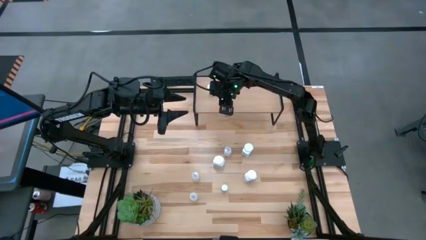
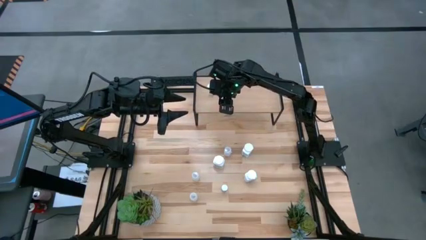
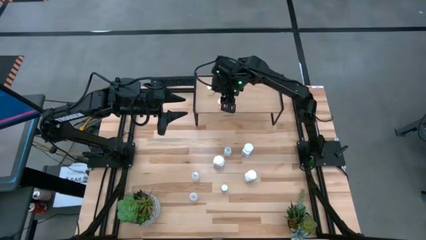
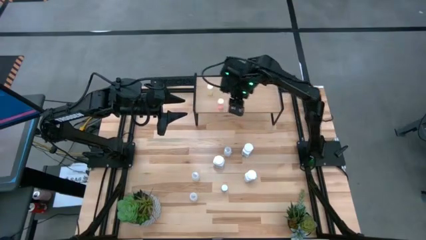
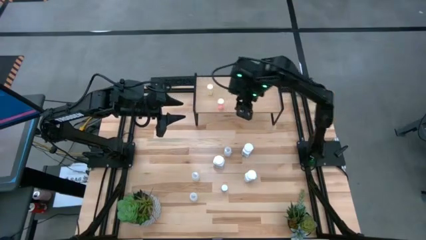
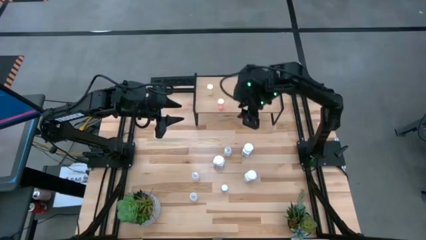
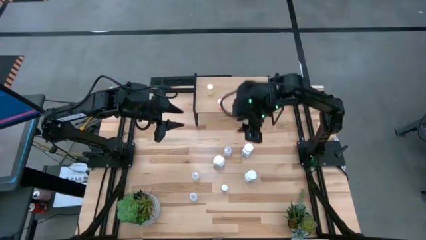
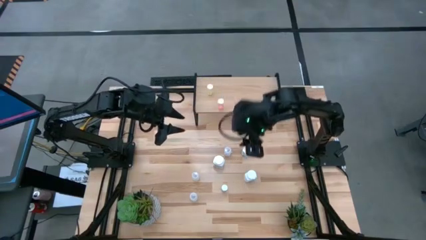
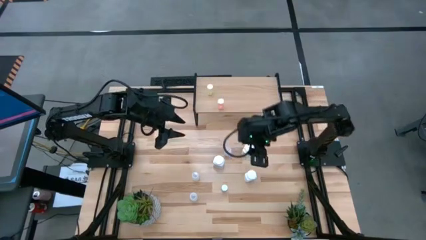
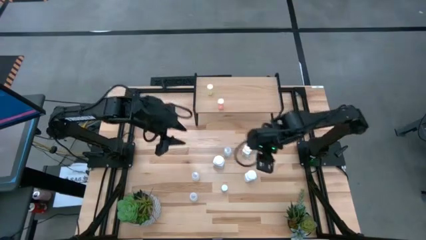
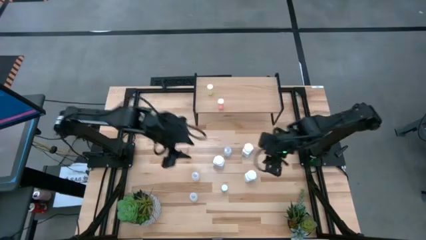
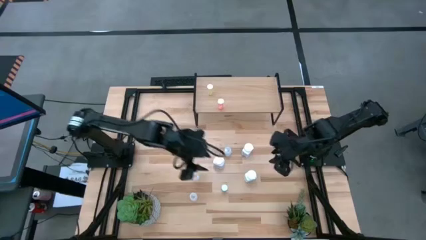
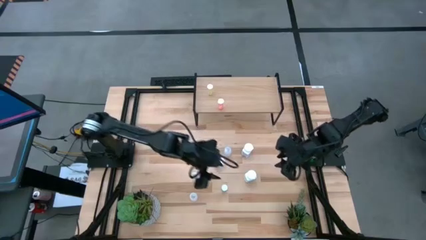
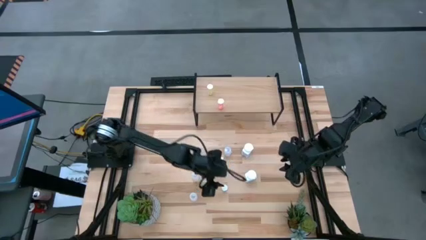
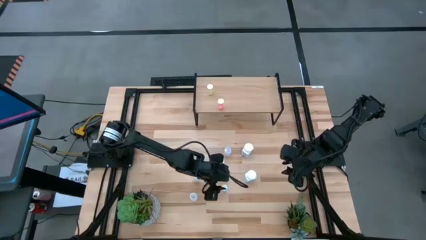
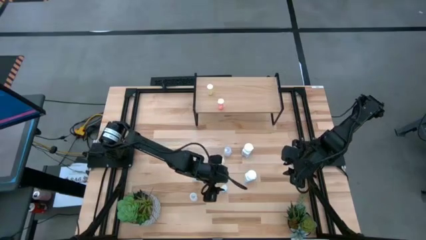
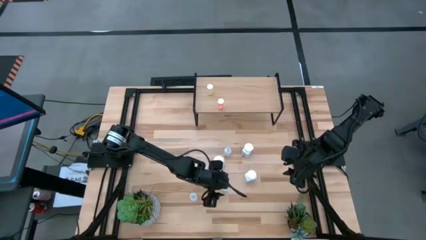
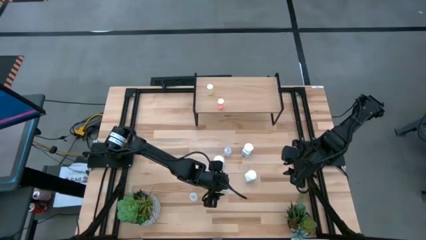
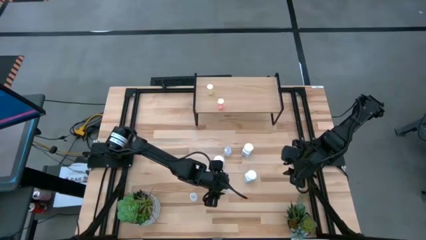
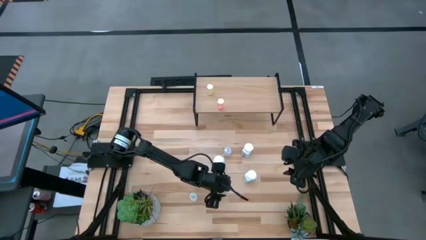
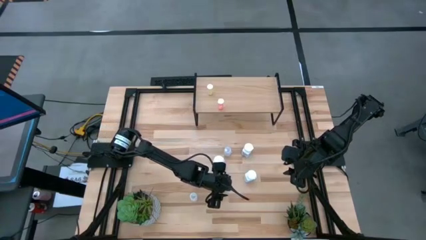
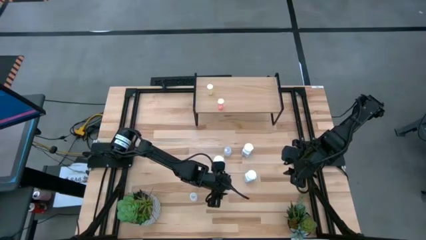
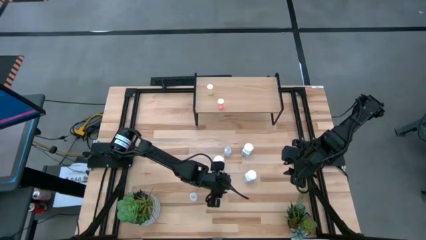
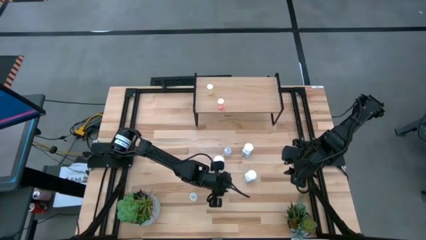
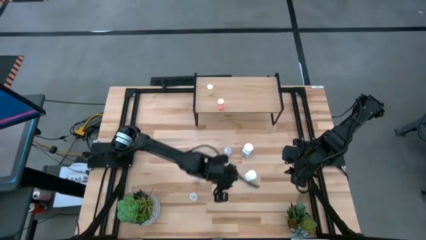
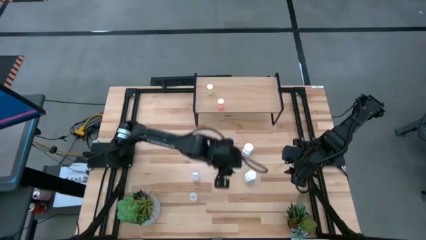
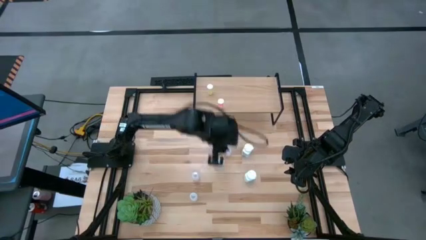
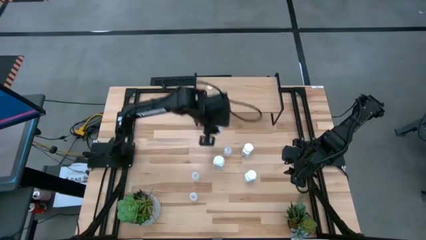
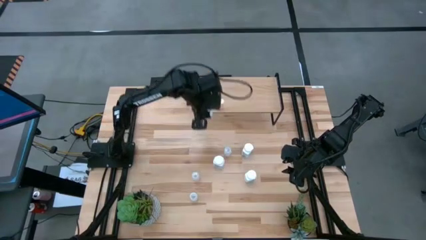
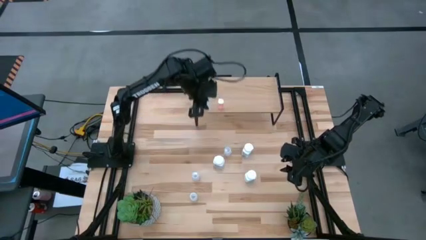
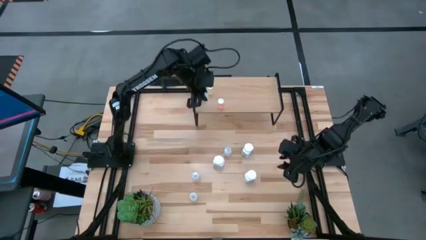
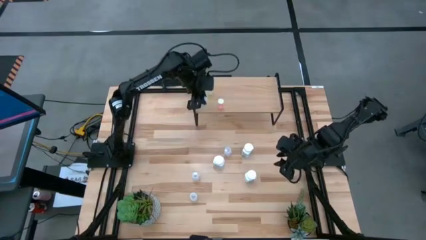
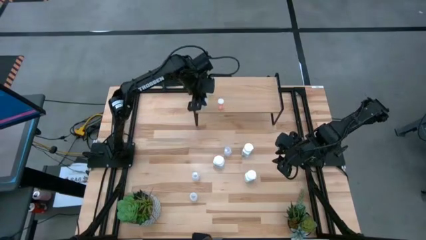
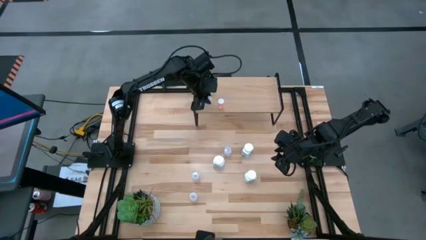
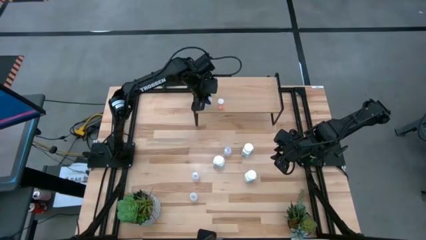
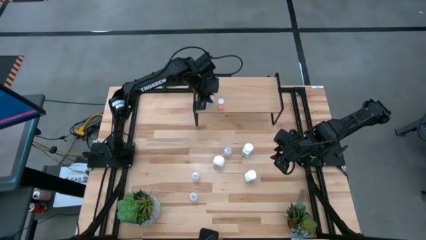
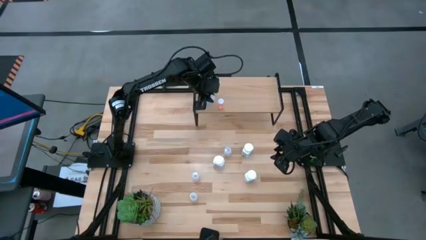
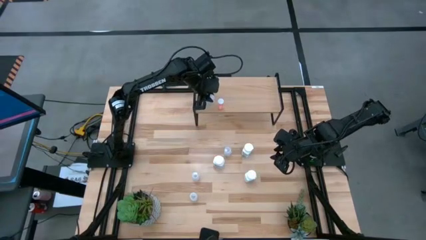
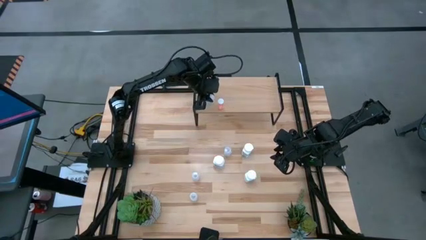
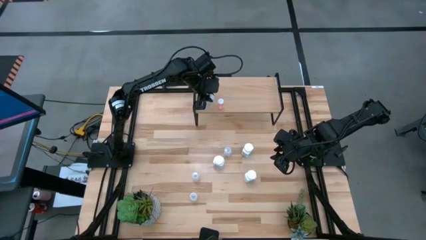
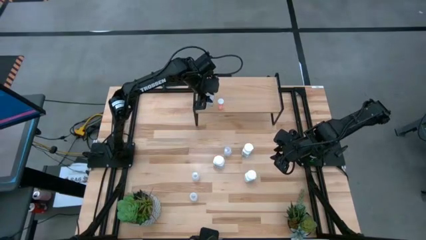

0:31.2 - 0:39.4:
Task: Pick and place medicine bottles onto shelf by color
Put the blue pill bottle on the shelf

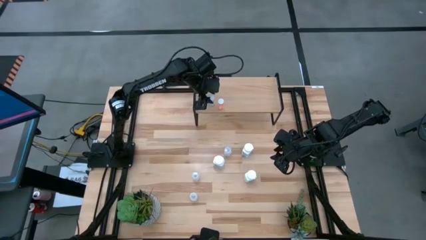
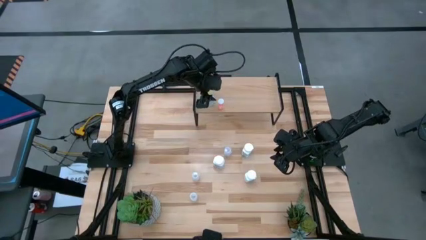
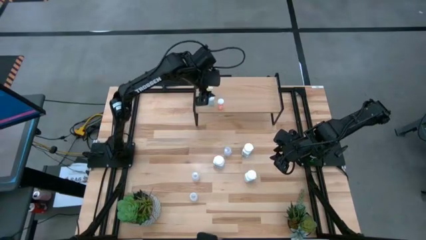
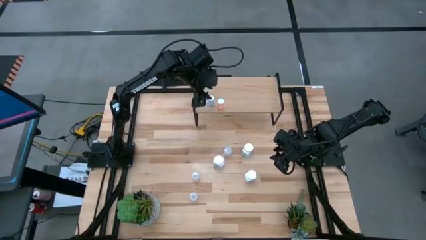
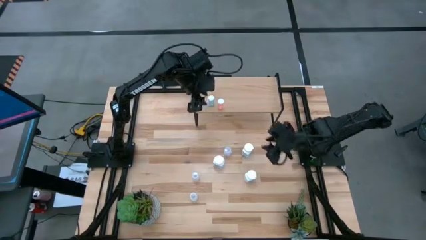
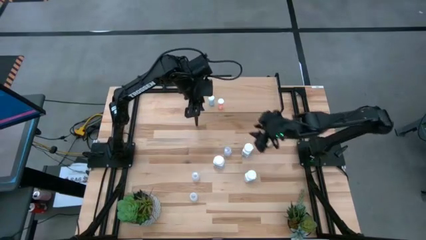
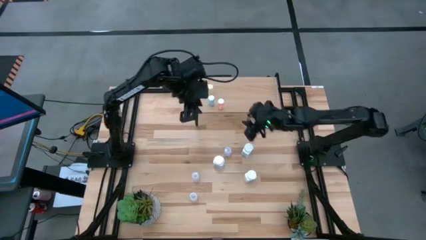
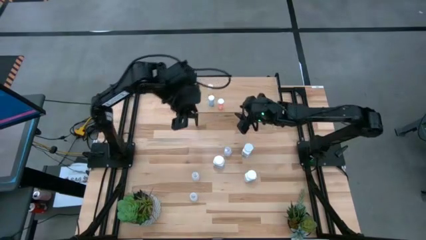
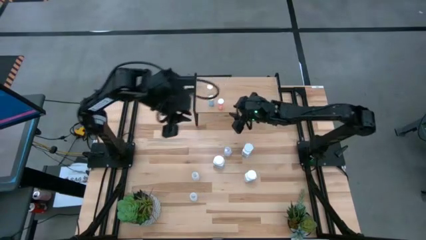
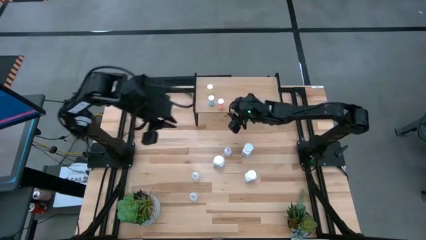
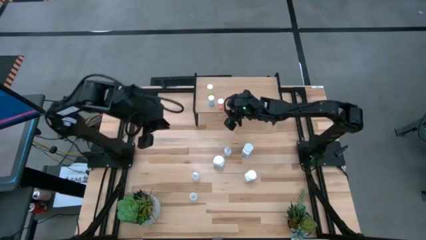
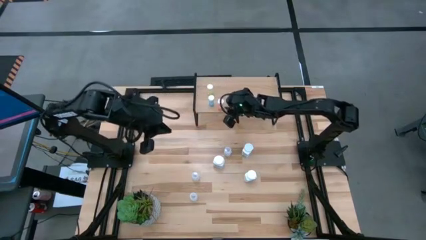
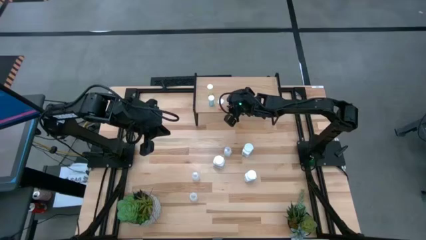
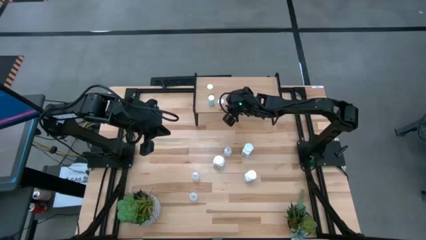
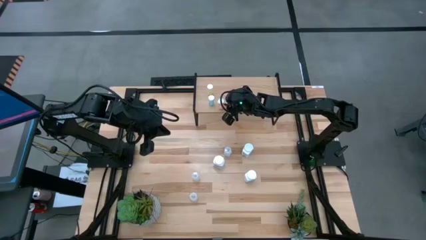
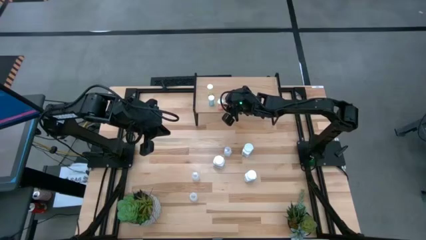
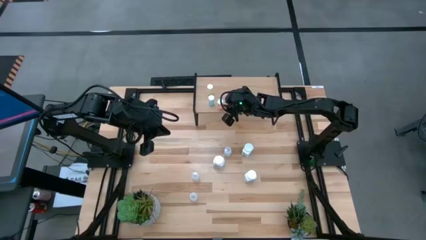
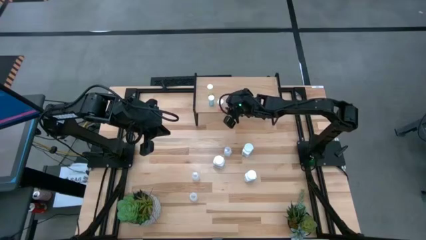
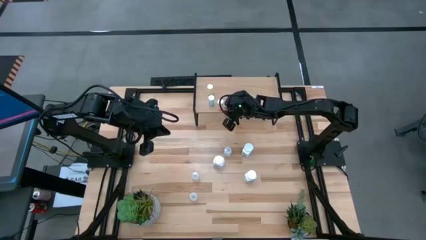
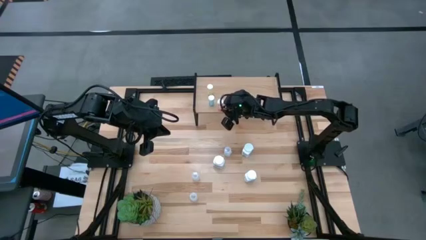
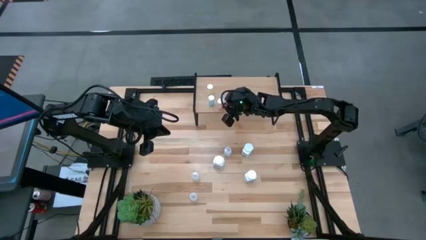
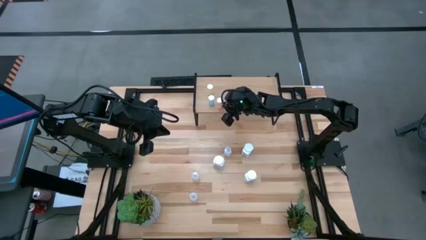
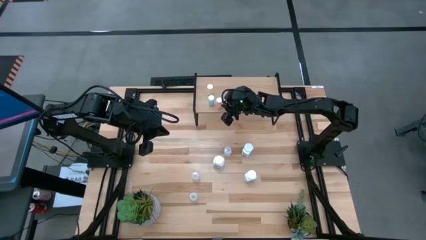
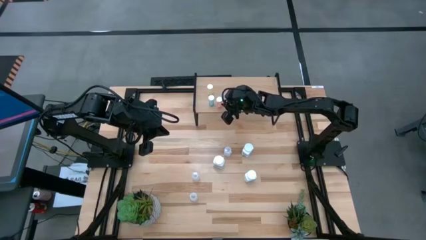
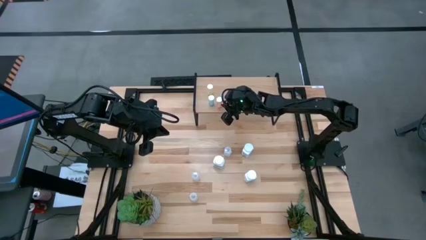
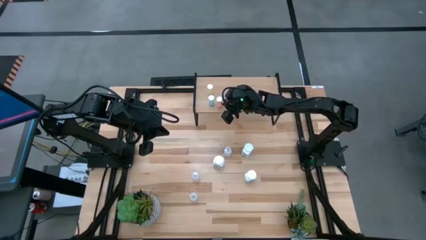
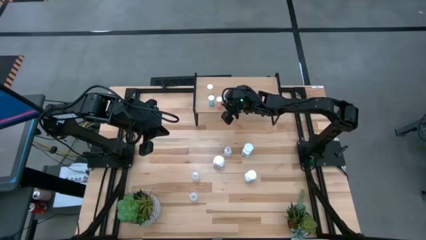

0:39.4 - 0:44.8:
Adjust the orange pill bottle on the shelf
